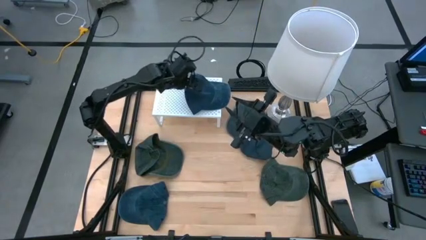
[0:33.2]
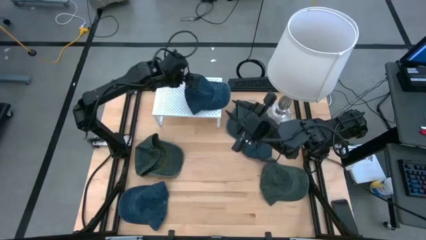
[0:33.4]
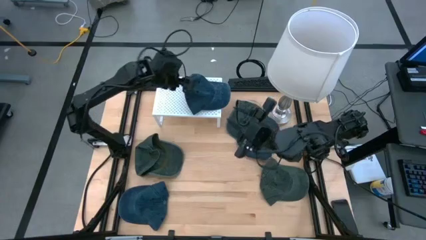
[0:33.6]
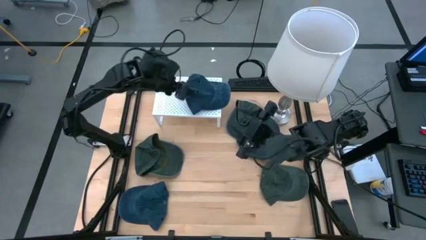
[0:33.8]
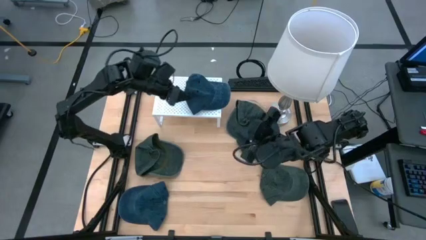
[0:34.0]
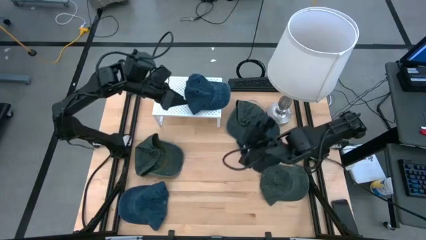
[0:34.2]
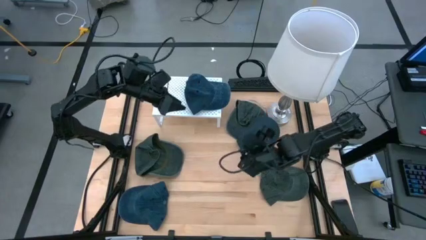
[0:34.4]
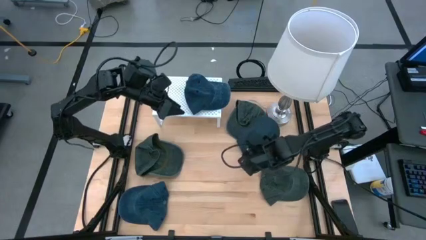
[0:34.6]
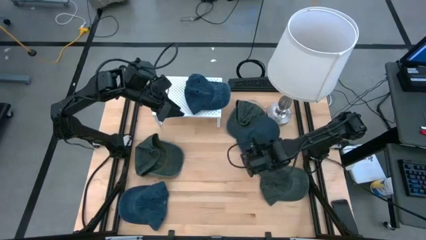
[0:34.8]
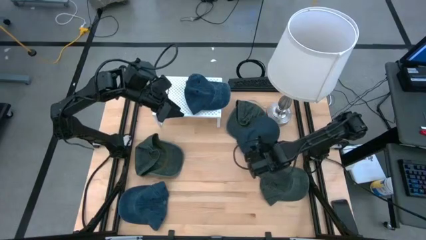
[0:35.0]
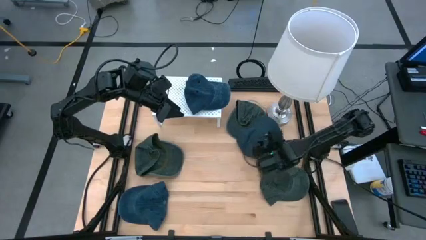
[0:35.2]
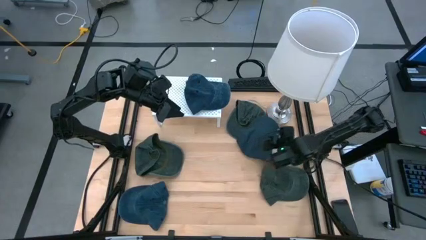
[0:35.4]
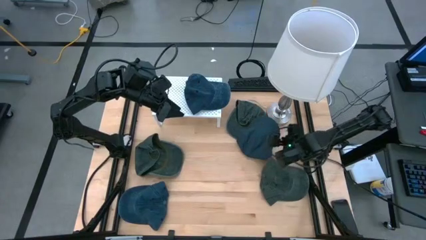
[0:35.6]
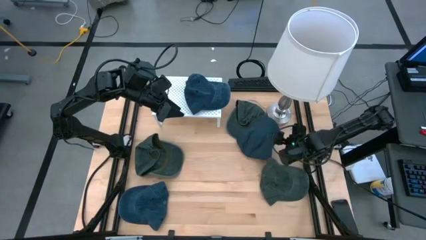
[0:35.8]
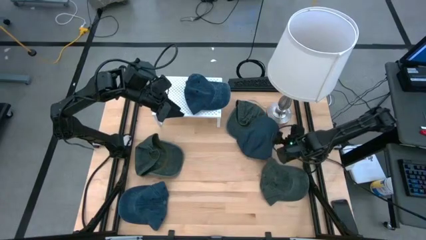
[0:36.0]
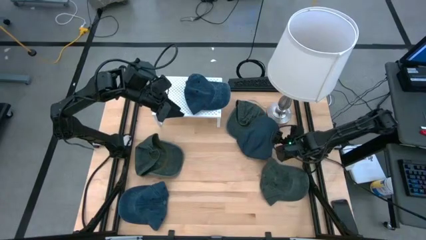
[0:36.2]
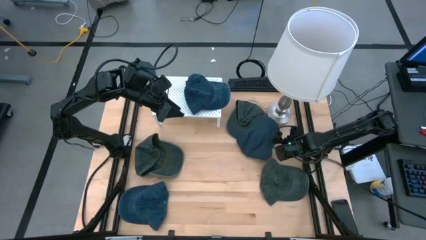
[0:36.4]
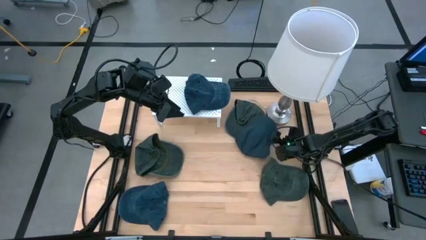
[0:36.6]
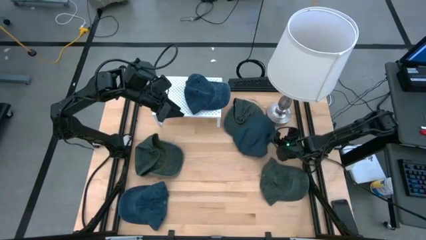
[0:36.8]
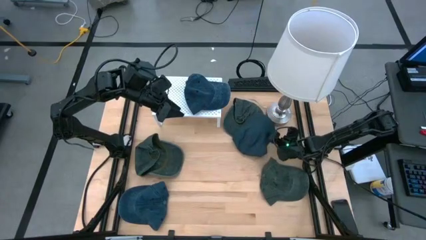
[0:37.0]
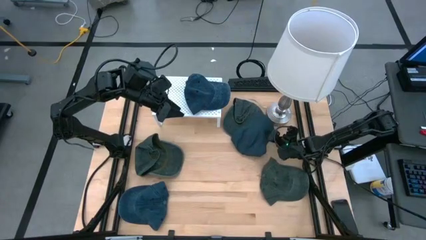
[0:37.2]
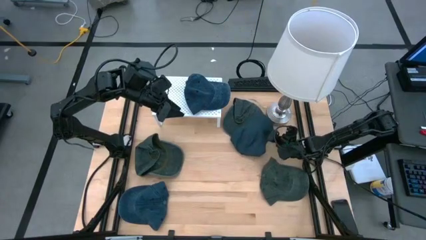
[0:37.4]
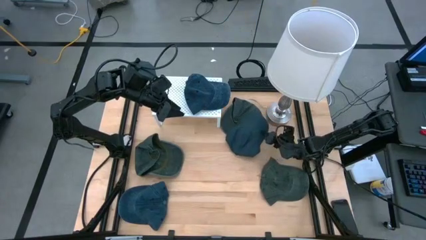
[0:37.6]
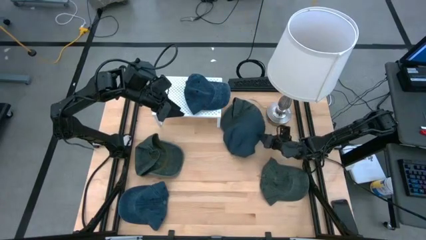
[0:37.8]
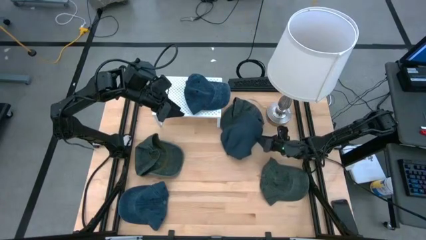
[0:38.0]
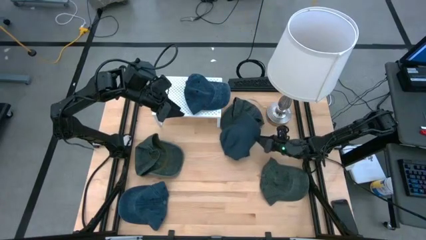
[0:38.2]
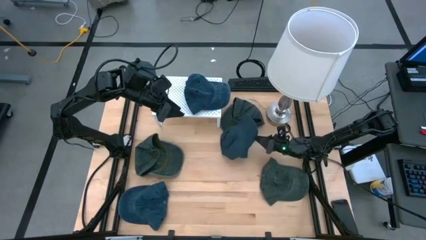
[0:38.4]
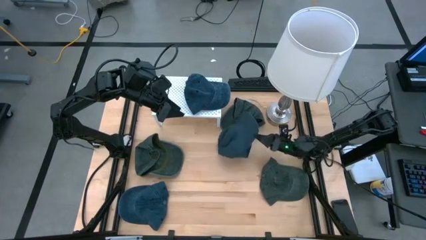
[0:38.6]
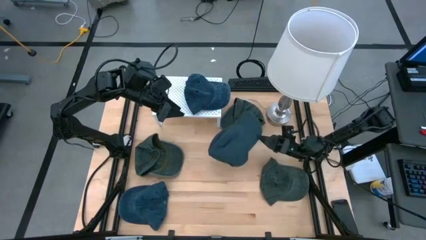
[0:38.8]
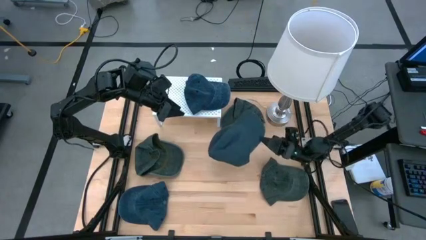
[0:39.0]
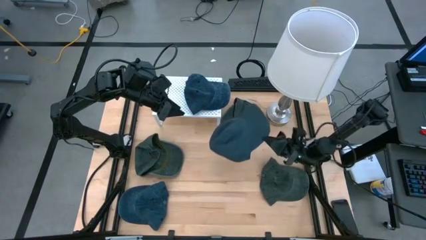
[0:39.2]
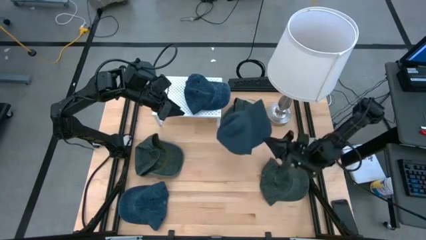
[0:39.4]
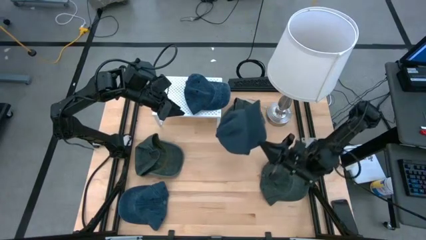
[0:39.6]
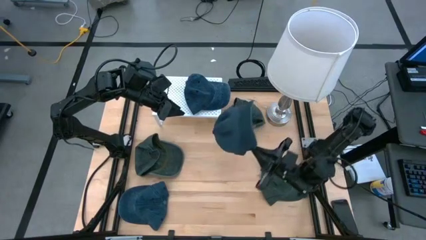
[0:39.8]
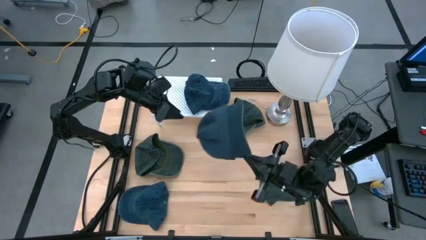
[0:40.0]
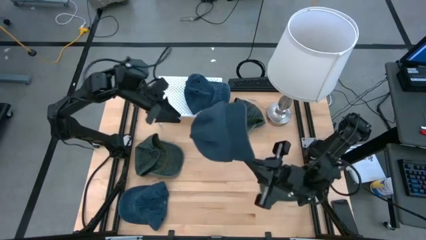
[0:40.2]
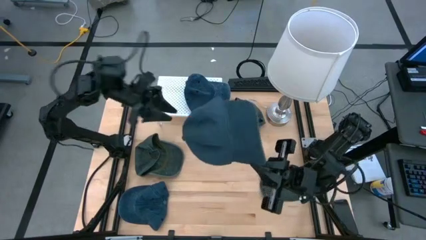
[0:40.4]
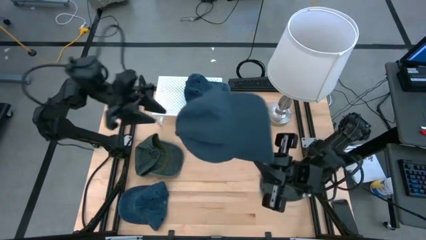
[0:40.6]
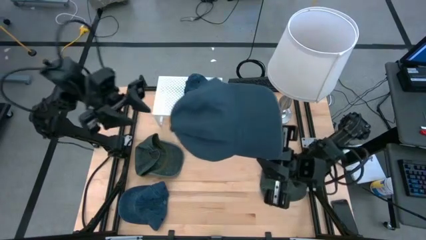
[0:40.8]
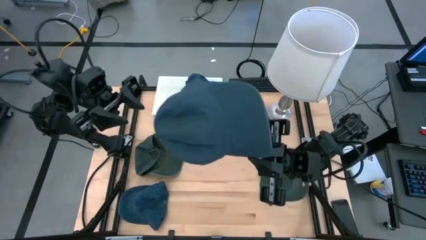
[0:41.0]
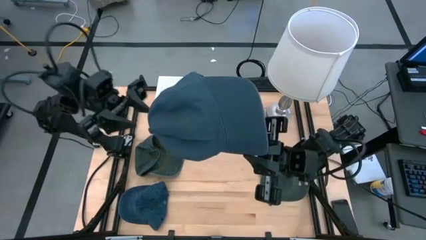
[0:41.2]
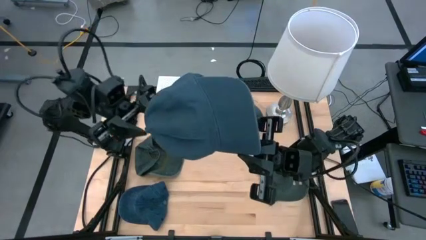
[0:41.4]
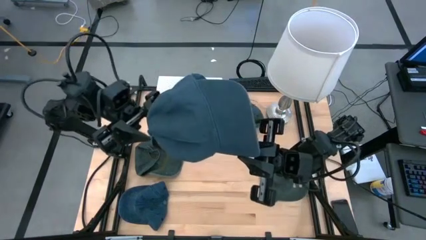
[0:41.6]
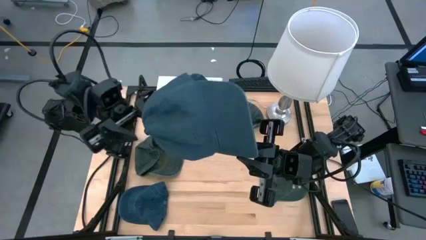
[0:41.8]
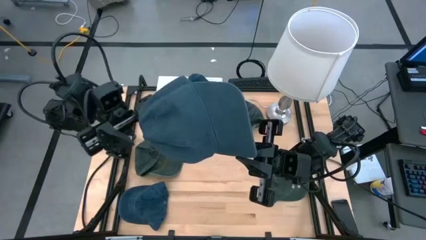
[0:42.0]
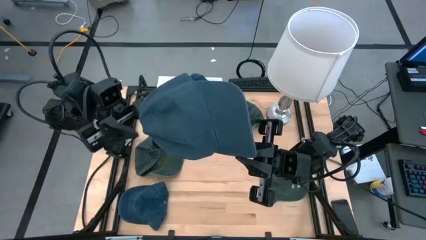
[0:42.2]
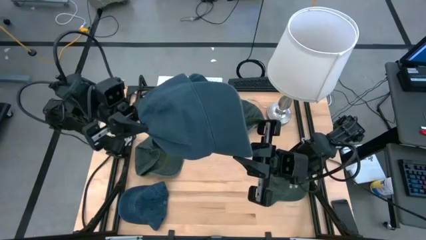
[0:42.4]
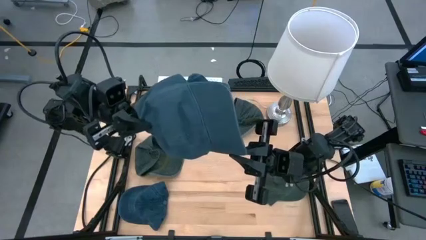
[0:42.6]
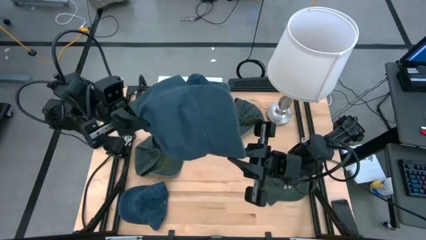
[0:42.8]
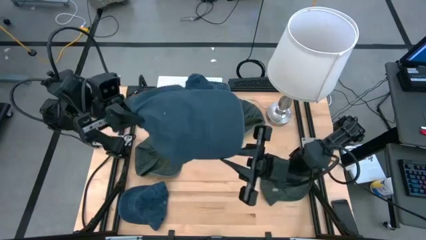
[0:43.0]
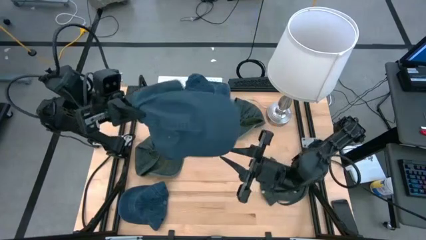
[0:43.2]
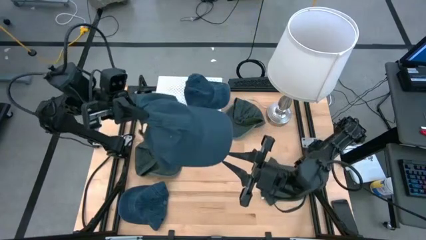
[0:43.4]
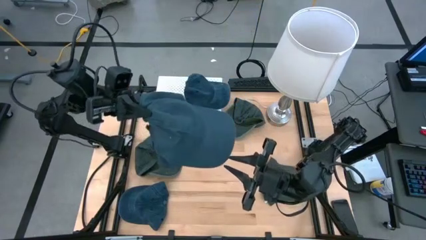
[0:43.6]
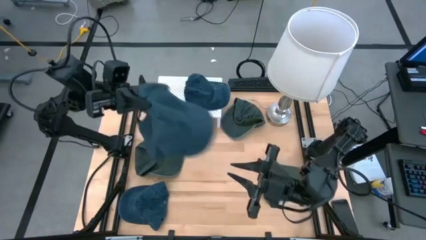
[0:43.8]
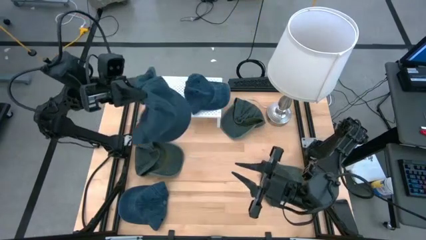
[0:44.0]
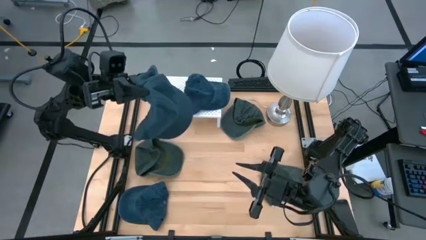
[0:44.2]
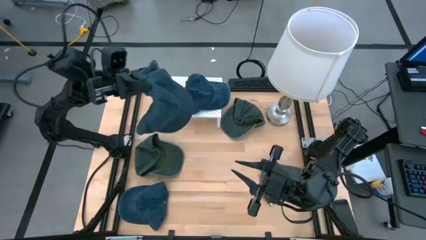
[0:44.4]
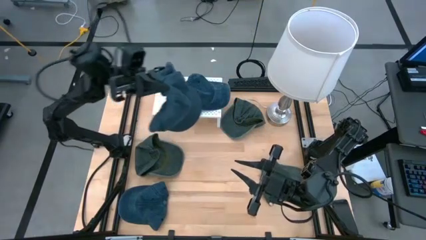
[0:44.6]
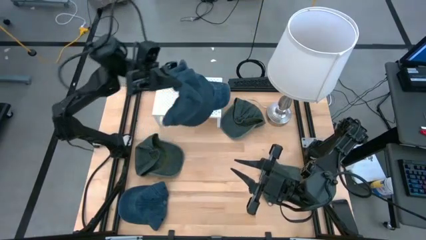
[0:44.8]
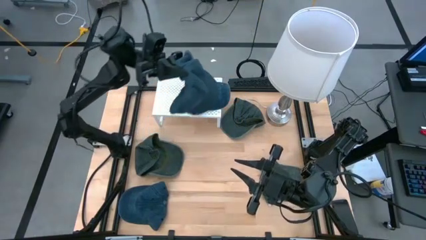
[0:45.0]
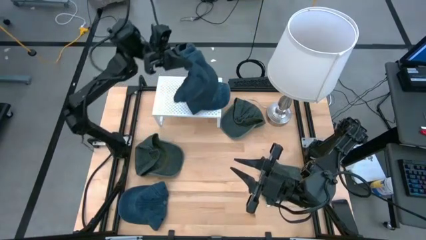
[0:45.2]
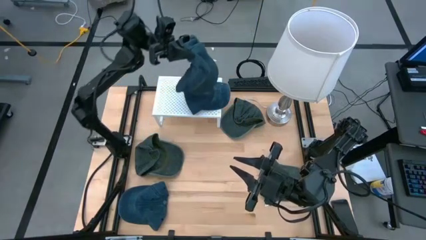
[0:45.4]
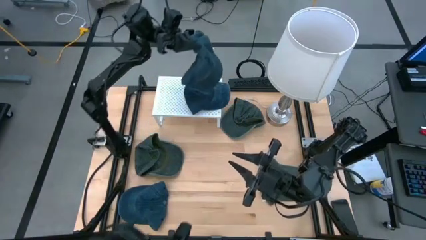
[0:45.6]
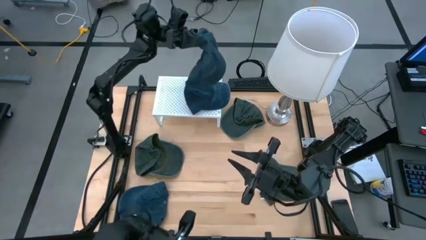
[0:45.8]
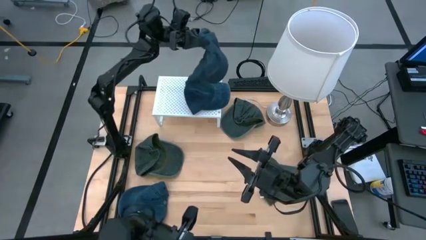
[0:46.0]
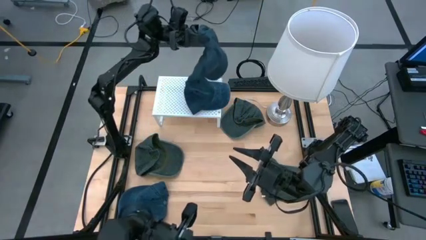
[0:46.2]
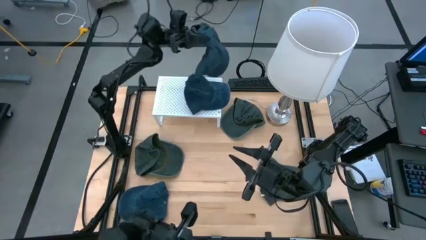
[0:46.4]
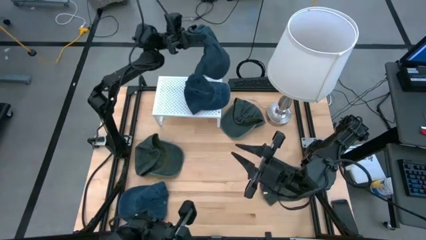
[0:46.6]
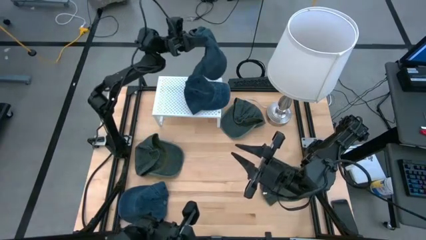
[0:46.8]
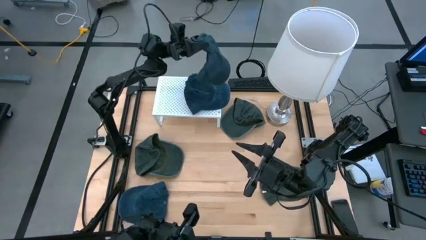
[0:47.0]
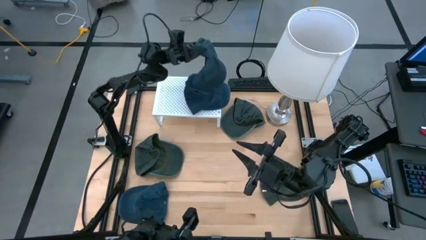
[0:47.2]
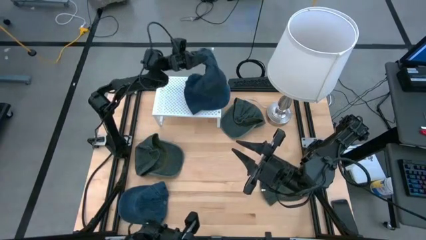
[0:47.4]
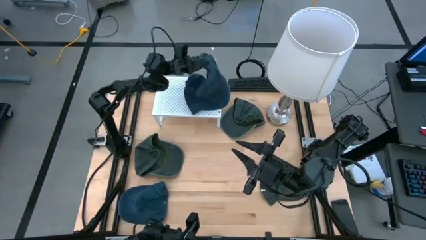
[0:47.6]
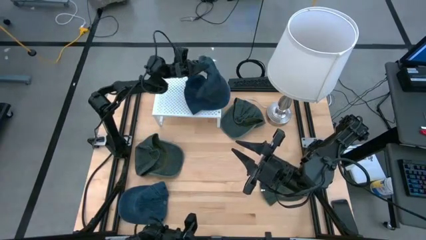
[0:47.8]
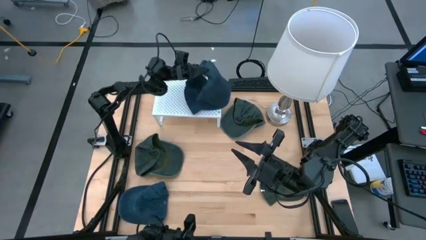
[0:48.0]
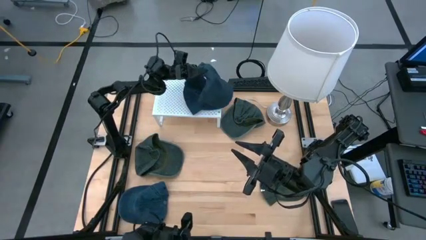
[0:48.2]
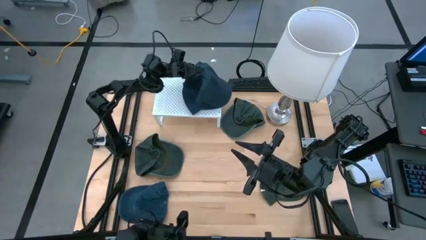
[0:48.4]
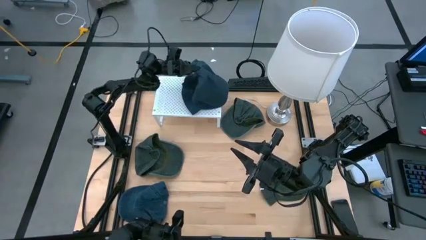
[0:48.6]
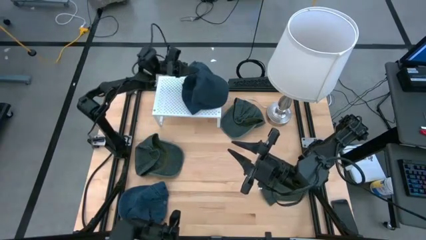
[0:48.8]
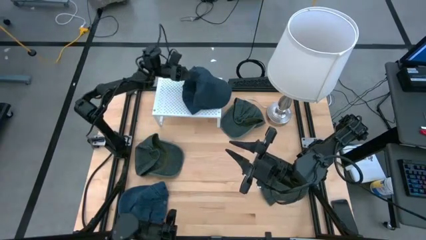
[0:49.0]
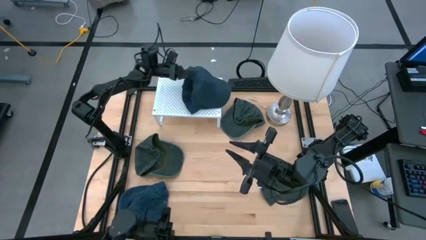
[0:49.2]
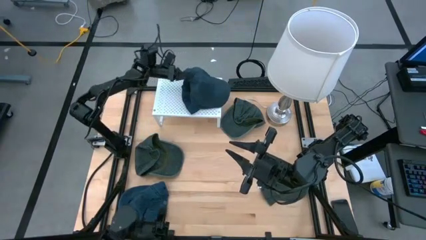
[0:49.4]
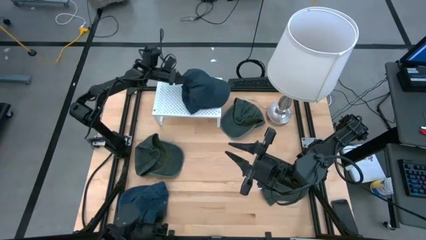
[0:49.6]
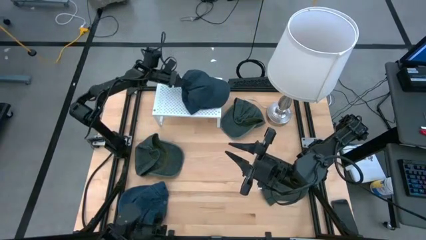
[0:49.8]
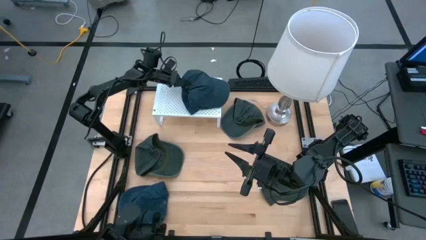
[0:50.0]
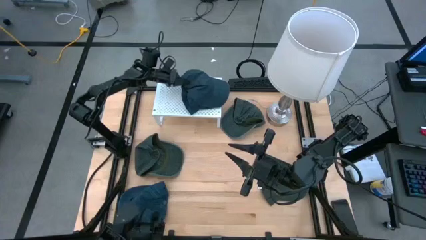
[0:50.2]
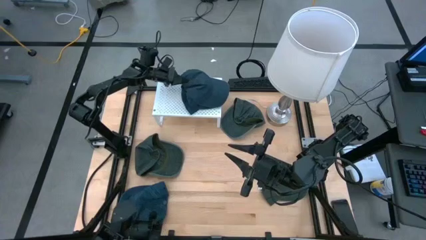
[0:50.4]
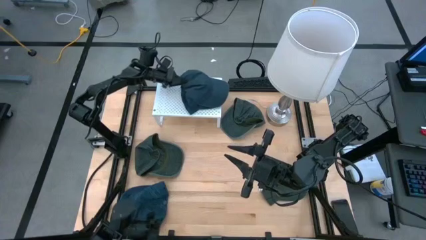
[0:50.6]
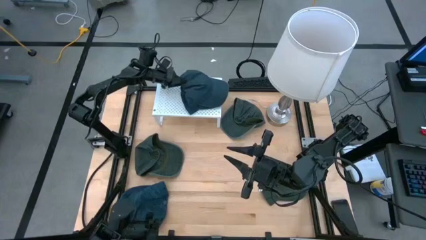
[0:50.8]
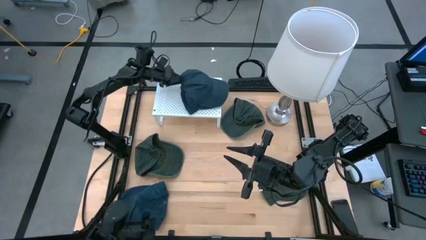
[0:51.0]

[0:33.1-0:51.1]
Task: Pick & Place hat
Stack the top blue cap on the blue cap on the shelf
